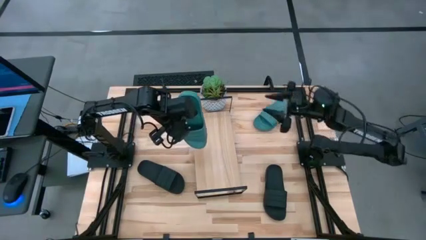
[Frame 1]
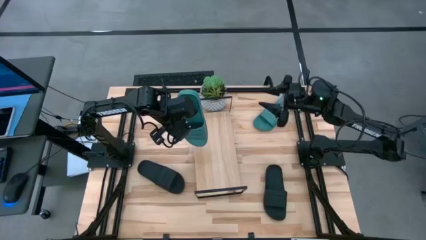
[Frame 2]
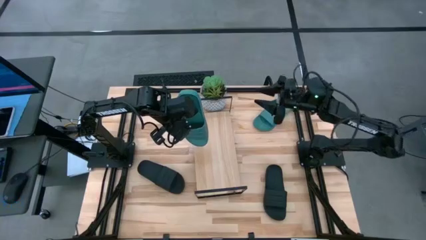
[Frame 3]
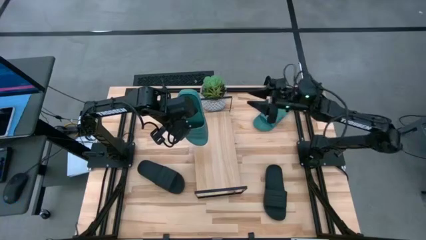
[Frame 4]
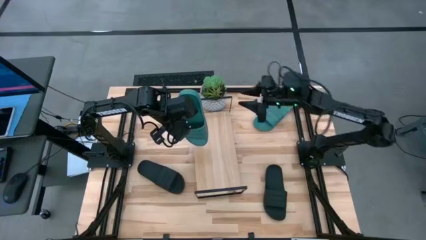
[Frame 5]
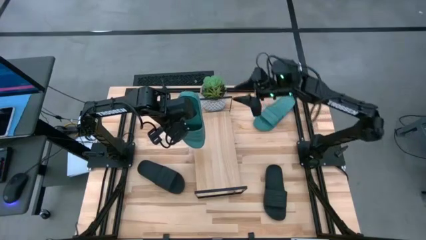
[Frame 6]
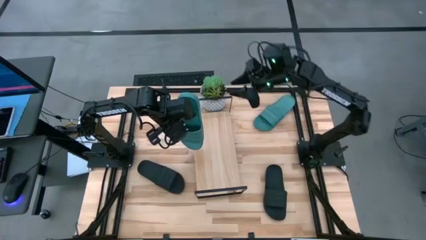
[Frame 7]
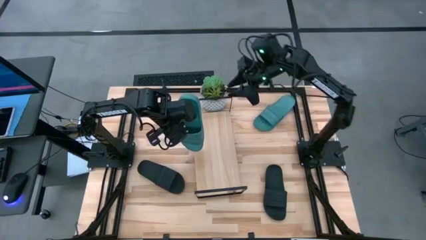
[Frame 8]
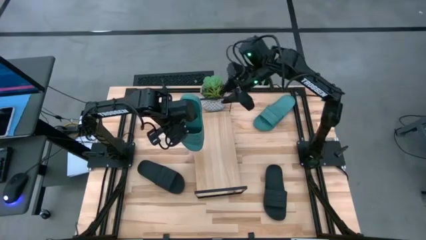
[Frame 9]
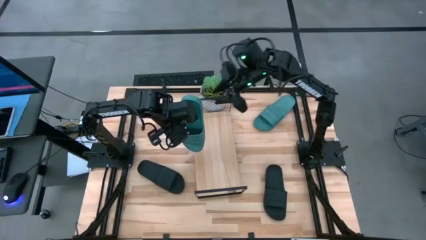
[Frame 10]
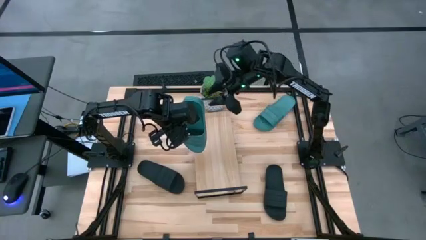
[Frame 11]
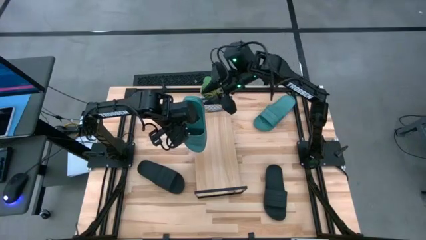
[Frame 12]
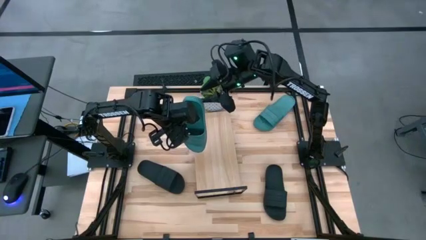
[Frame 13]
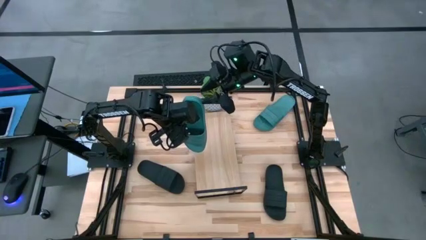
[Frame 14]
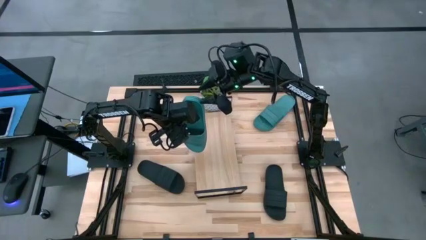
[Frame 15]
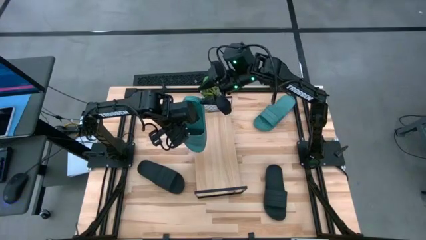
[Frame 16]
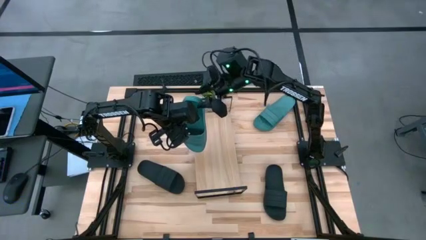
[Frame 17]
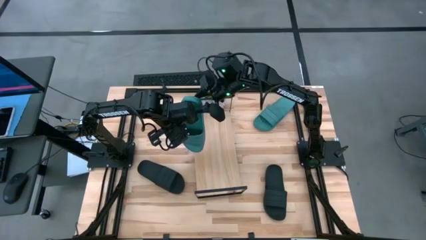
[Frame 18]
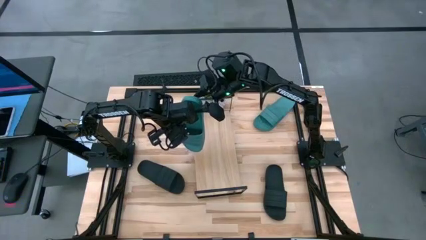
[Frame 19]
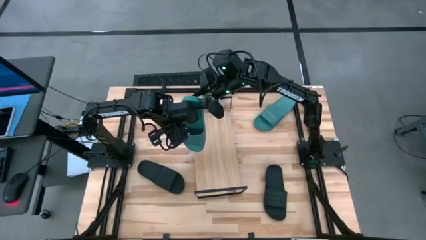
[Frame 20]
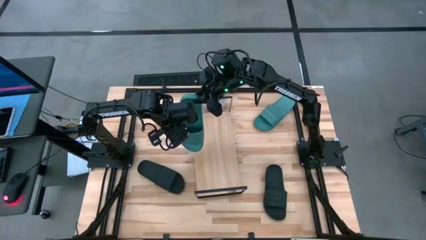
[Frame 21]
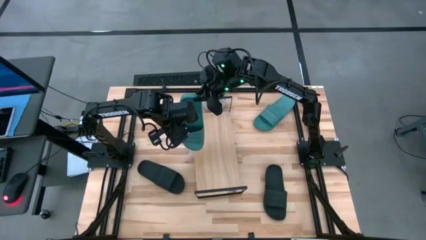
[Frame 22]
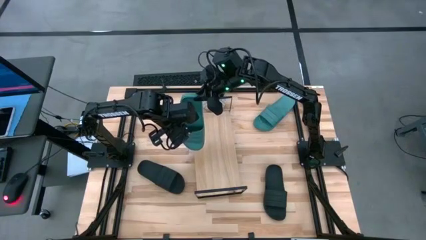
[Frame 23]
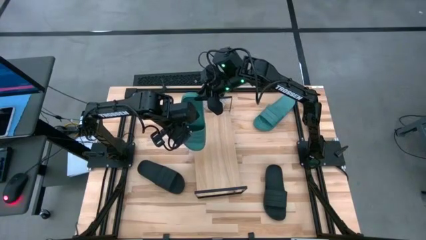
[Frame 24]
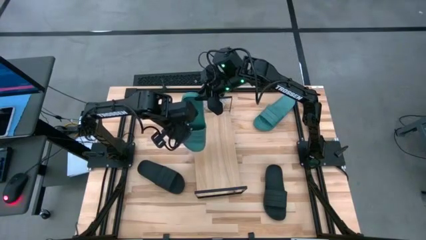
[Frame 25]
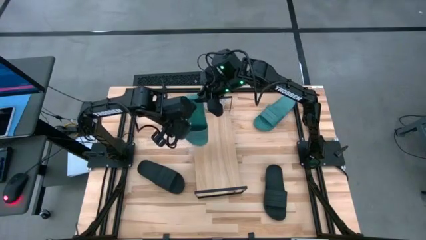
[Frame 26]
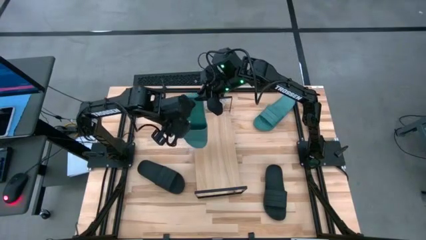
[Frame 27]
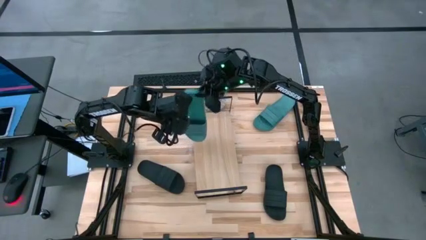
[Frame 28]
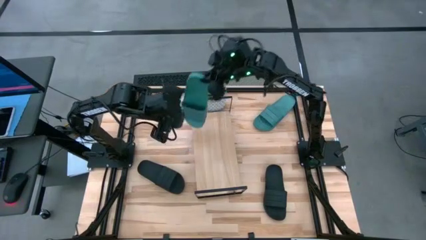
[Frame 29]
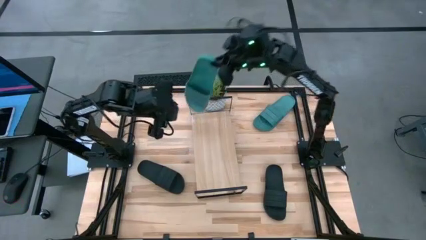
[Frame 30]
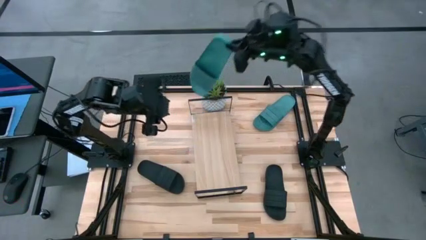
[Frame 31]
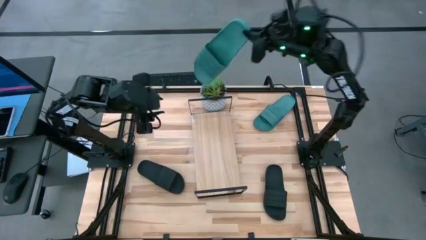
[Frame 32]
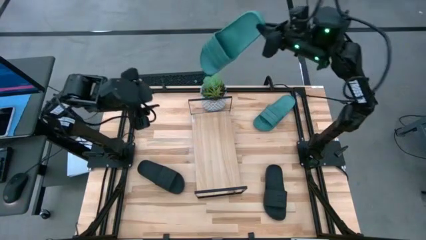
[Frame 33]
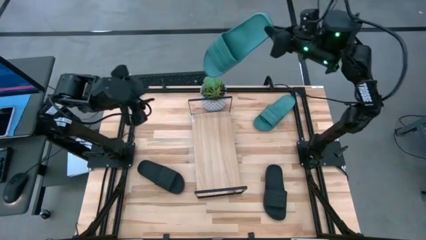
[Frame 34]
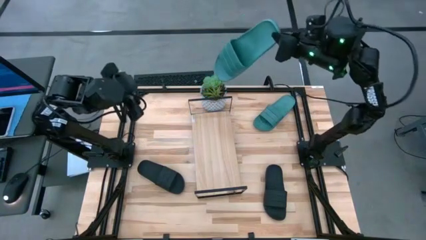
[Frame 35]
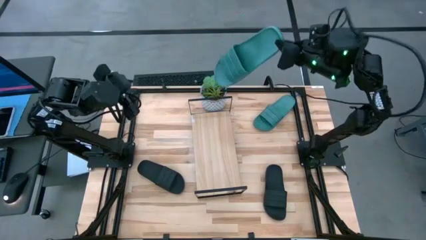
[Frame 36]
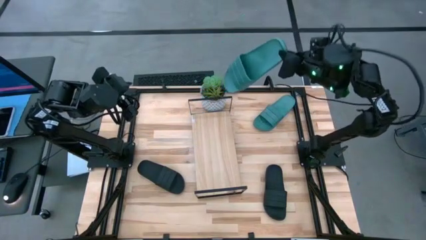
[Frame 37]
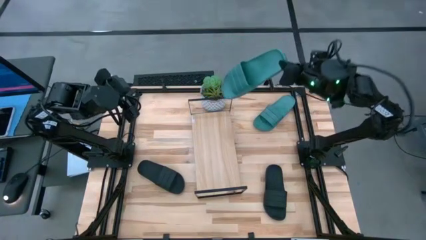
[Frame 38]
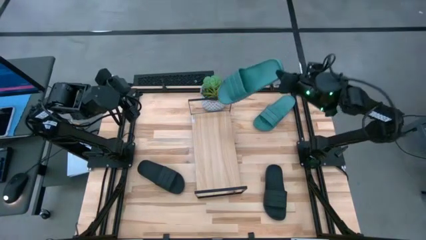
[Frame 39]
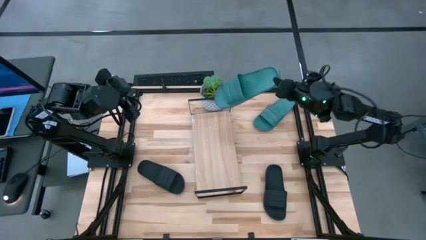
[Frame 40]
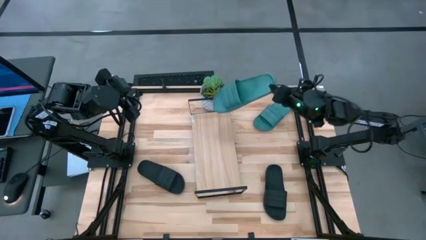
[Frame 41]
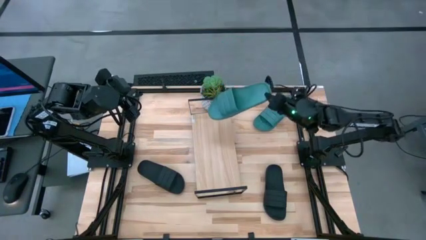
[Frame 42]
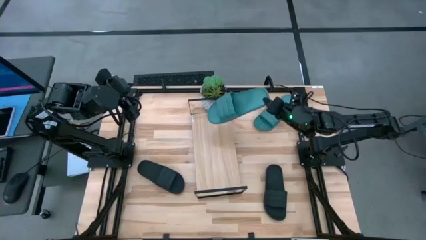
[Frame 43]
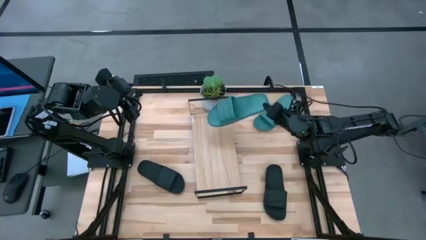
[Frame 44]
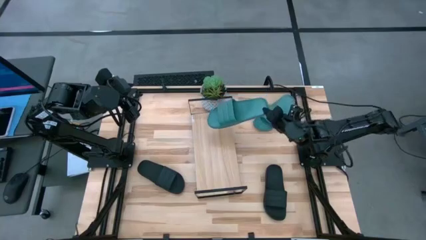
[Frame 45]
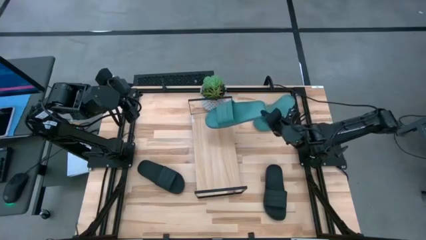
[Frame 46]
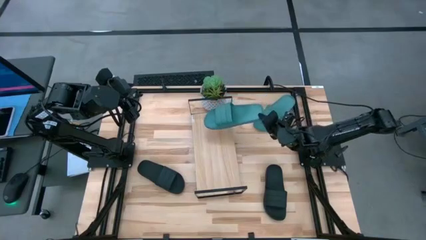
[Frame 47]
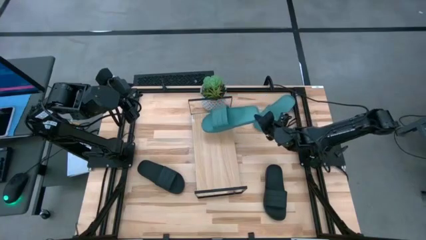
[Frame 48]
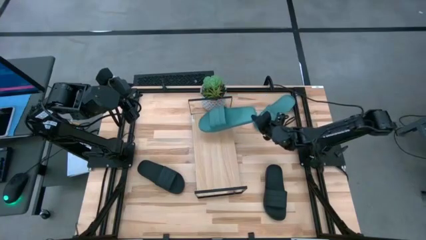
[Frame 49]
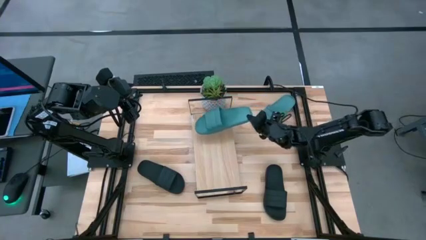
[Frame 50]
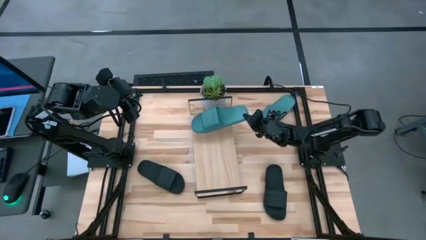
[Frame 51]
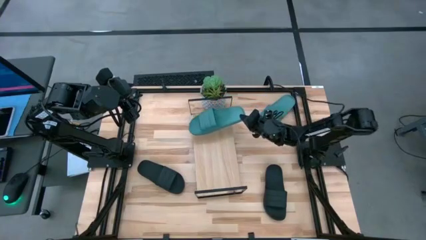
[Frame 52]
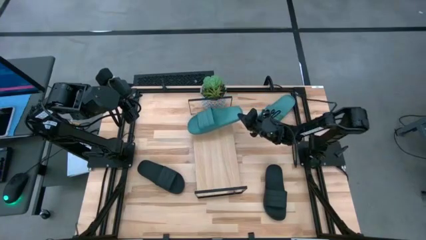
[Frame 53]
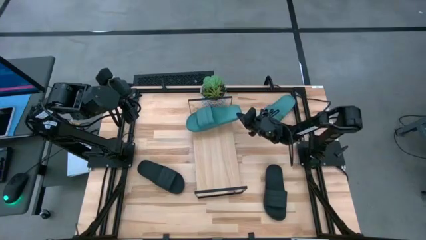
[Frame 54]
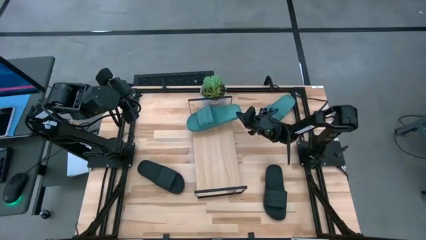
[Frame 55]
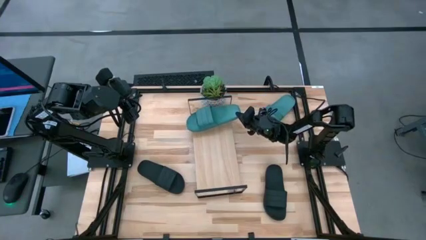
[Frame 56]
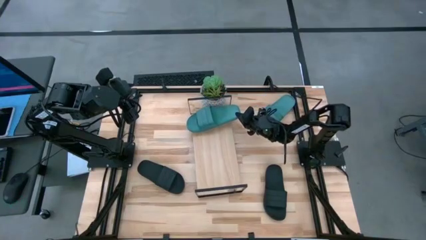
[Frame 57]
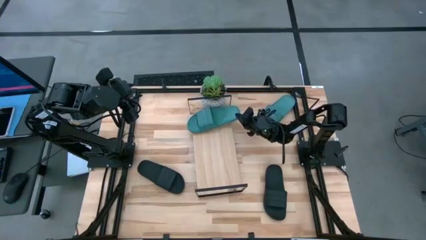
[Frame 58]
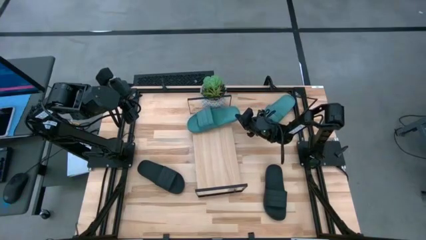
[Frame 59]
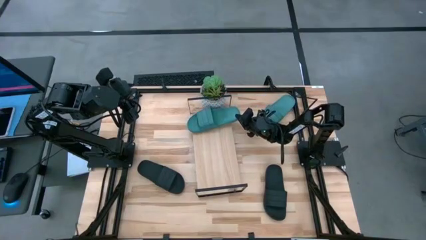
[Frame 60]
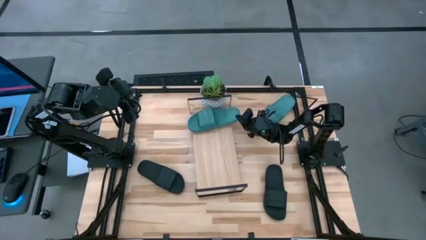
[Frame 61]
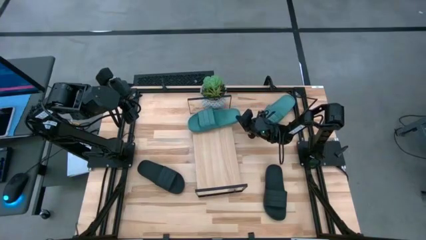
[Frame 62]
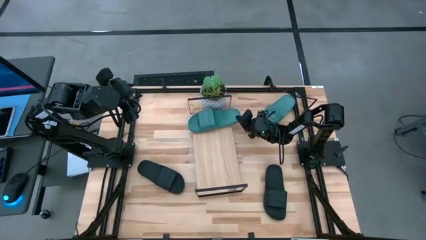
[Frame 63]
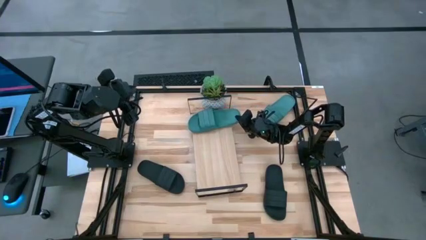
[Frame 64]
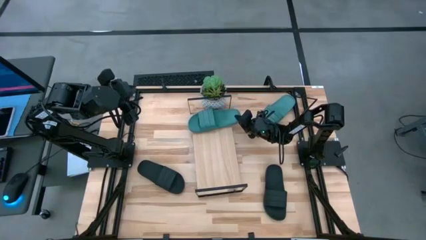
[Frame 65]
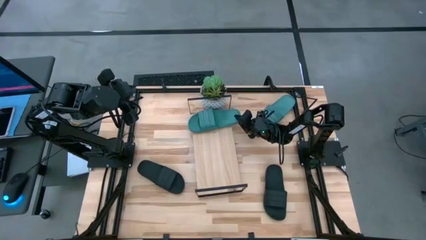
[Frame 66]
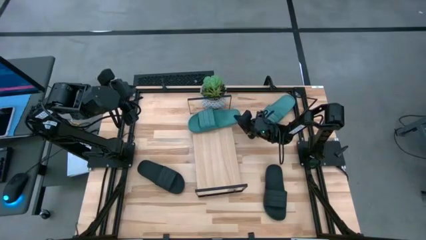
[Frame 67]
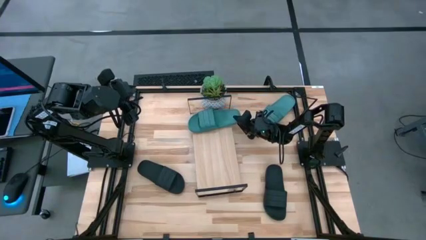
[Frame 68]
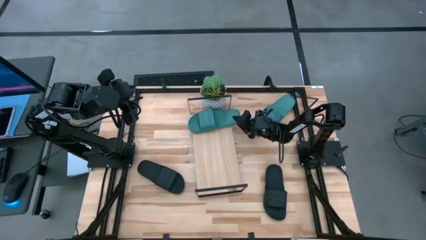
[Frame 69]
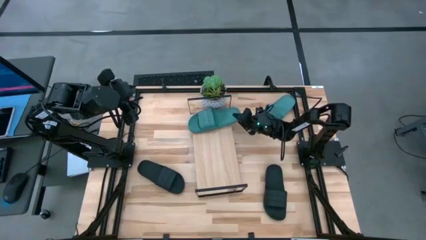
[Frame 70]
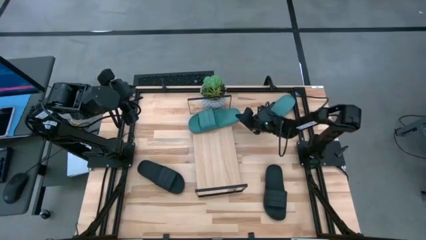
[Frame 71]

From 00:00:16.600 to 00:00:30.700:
Task: Pick and place slides into the shelf
Put the left blue slides on the shelf
